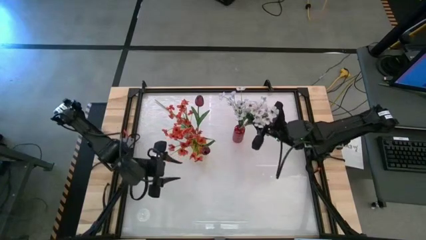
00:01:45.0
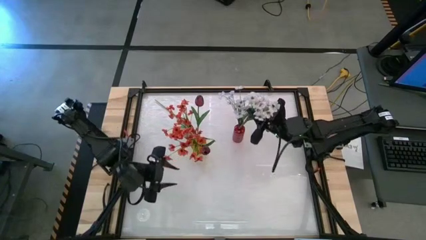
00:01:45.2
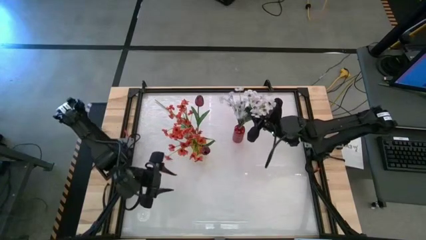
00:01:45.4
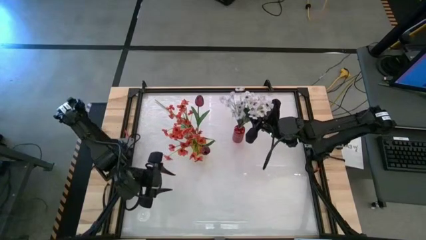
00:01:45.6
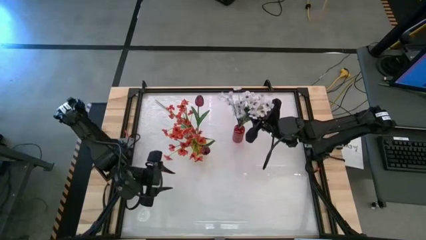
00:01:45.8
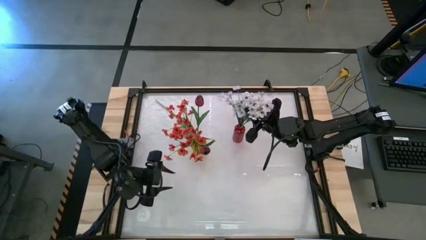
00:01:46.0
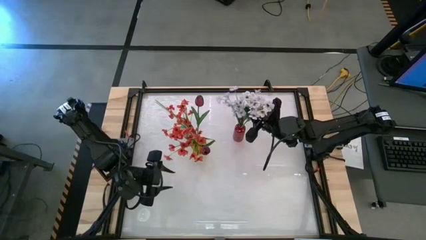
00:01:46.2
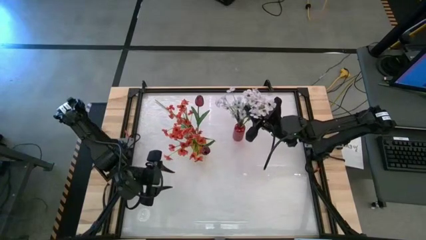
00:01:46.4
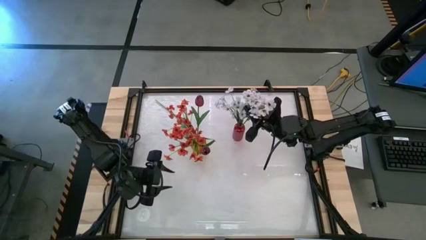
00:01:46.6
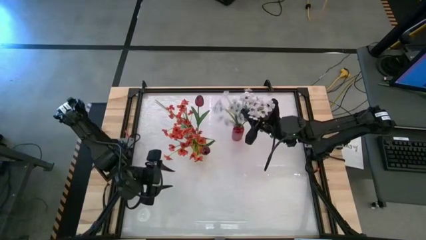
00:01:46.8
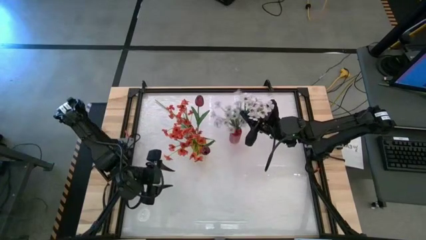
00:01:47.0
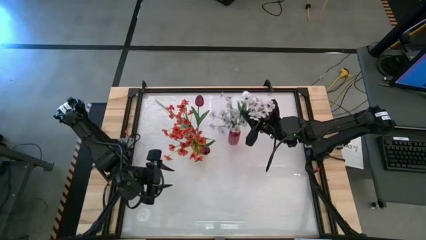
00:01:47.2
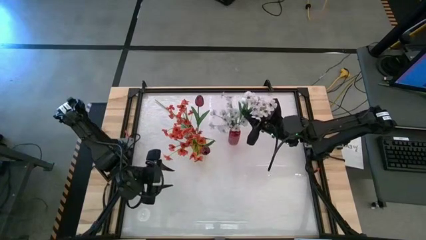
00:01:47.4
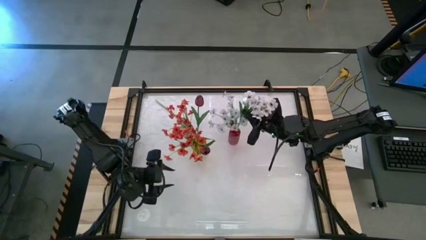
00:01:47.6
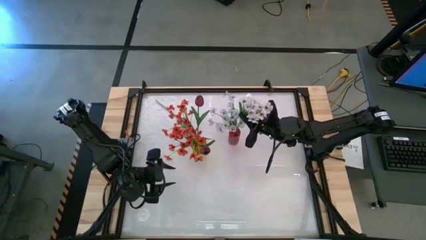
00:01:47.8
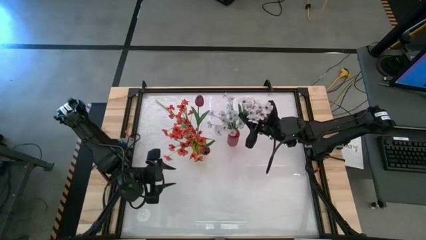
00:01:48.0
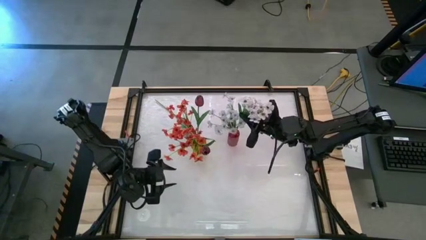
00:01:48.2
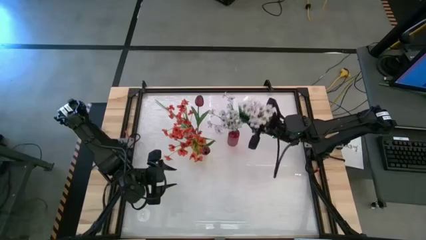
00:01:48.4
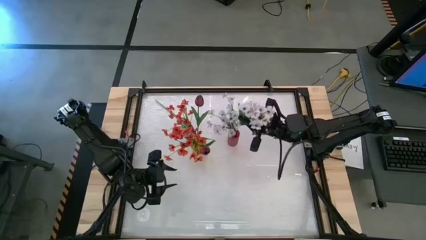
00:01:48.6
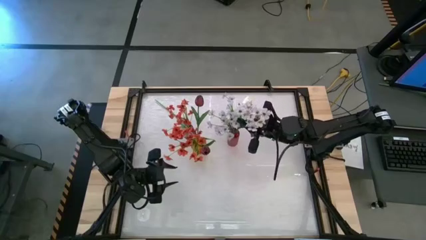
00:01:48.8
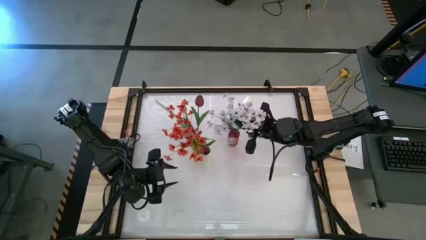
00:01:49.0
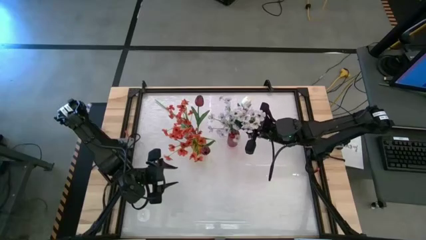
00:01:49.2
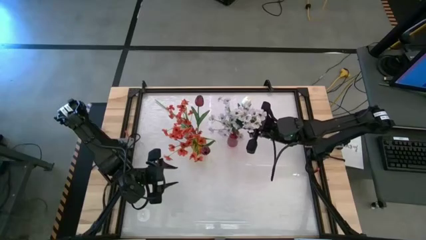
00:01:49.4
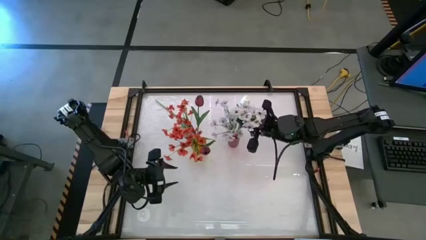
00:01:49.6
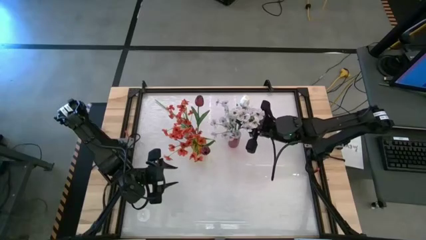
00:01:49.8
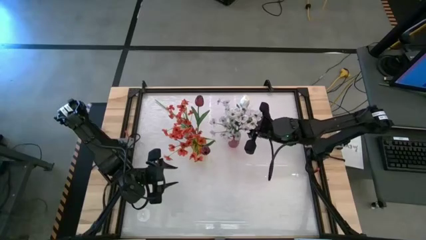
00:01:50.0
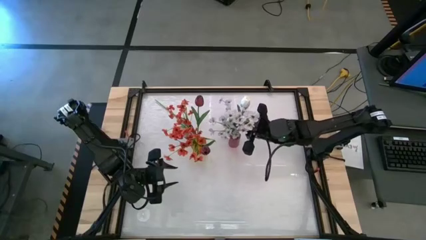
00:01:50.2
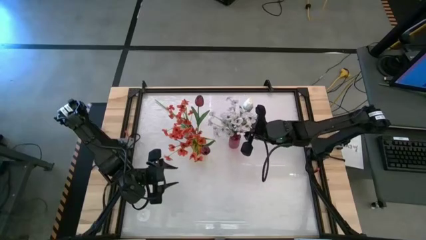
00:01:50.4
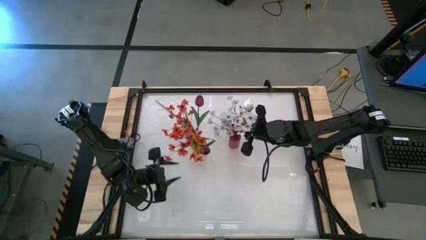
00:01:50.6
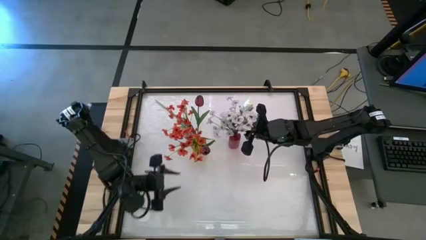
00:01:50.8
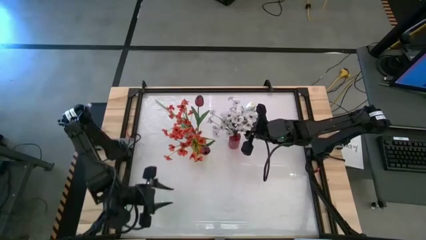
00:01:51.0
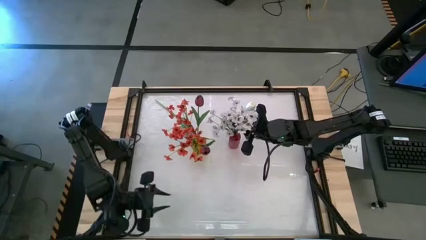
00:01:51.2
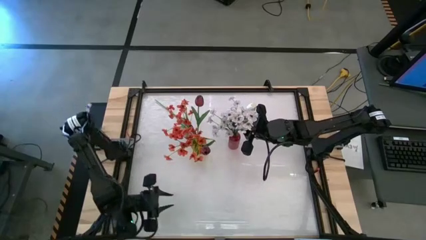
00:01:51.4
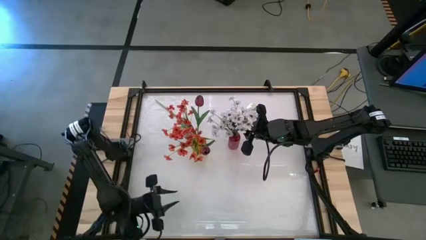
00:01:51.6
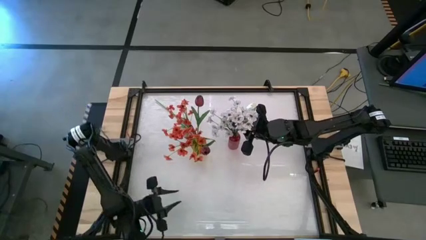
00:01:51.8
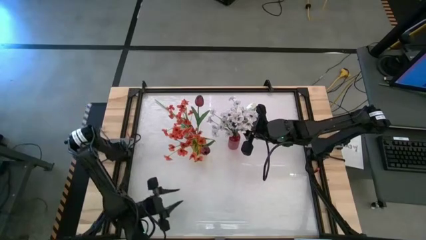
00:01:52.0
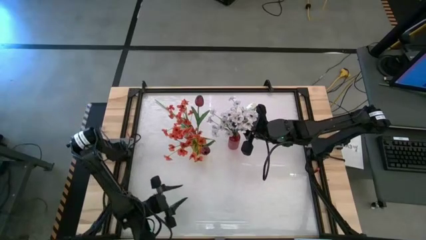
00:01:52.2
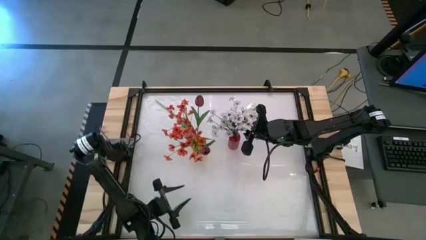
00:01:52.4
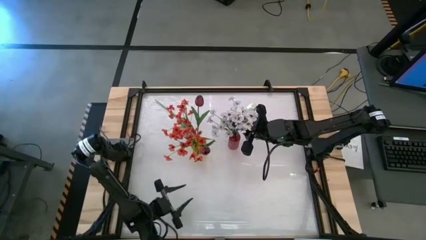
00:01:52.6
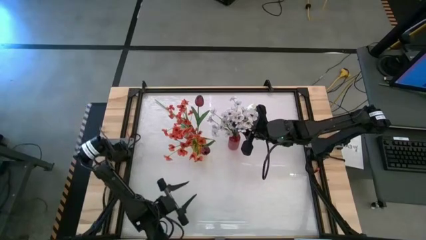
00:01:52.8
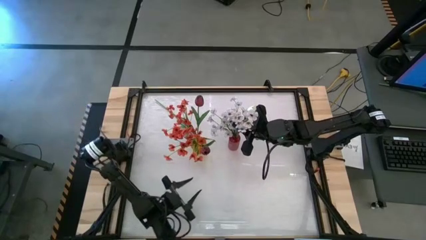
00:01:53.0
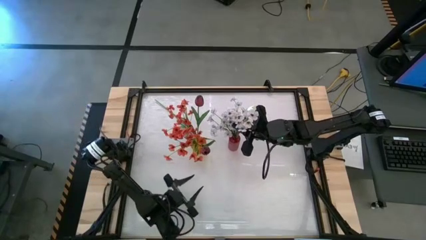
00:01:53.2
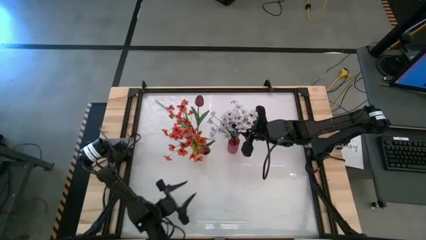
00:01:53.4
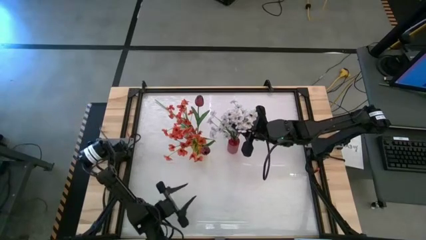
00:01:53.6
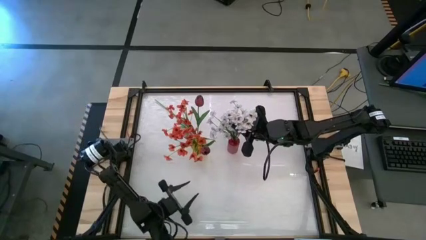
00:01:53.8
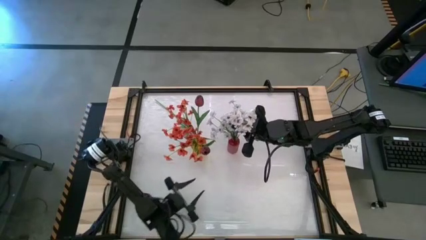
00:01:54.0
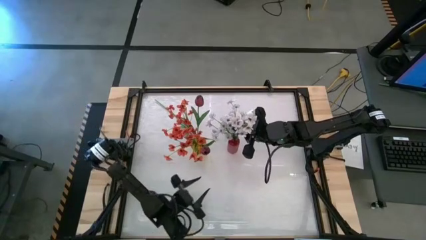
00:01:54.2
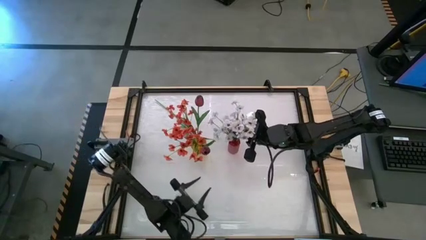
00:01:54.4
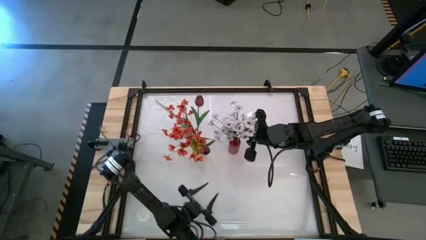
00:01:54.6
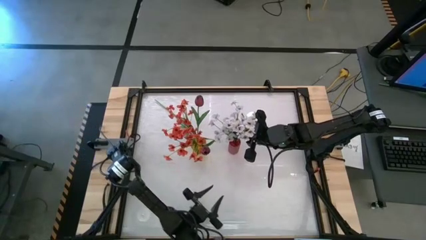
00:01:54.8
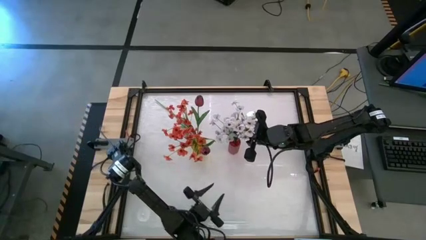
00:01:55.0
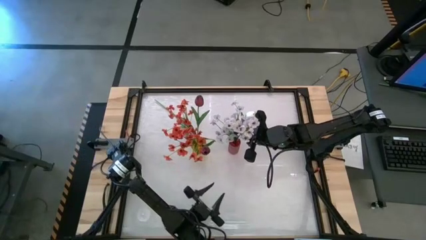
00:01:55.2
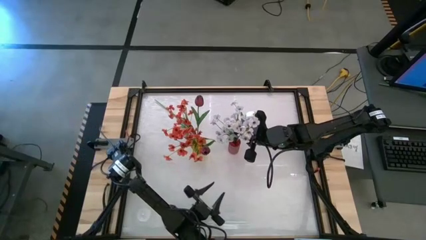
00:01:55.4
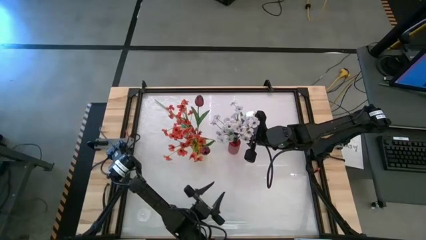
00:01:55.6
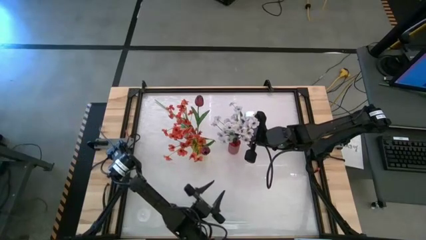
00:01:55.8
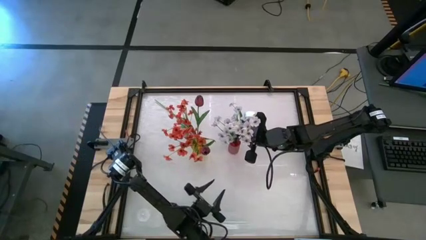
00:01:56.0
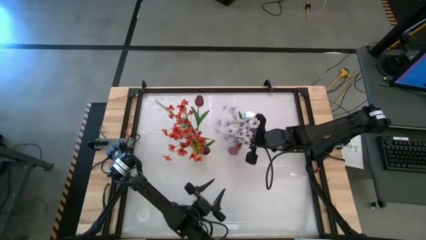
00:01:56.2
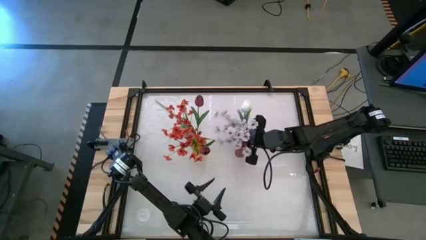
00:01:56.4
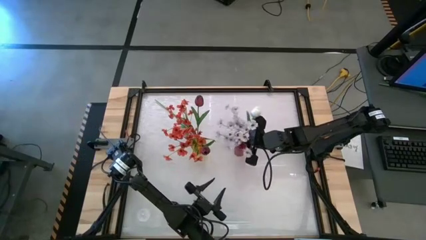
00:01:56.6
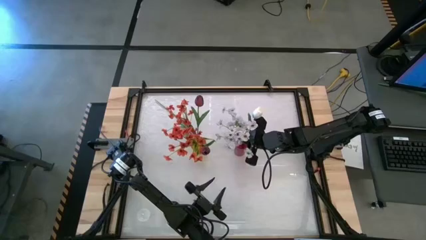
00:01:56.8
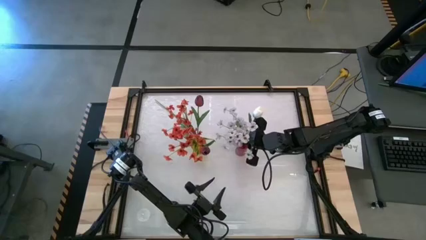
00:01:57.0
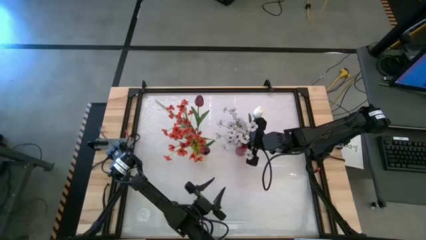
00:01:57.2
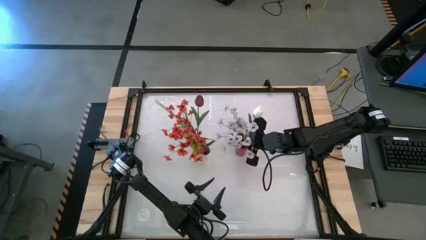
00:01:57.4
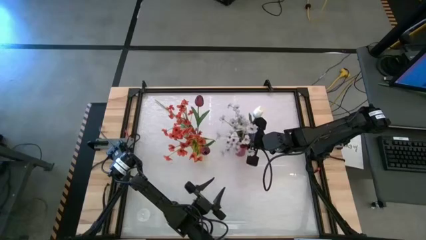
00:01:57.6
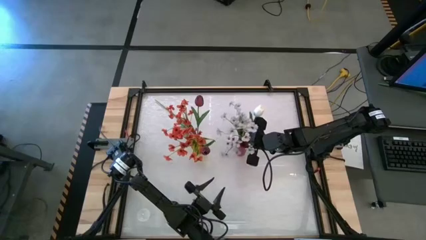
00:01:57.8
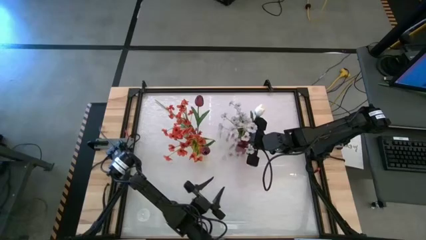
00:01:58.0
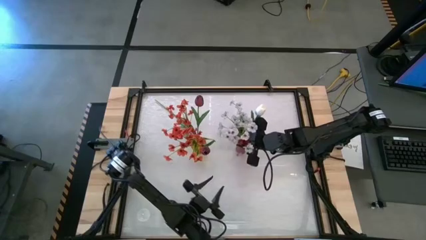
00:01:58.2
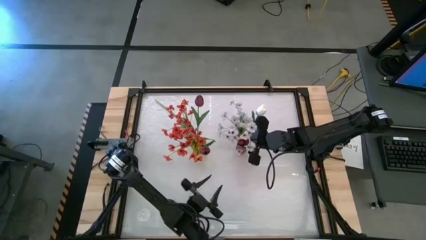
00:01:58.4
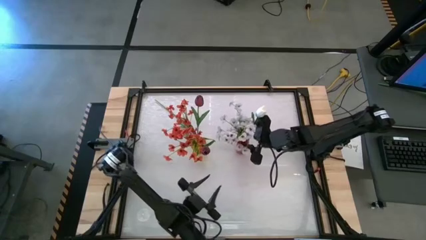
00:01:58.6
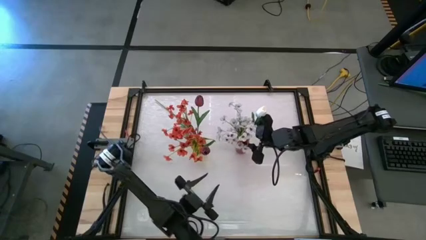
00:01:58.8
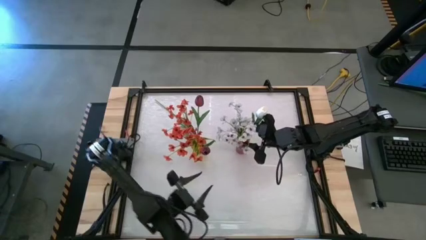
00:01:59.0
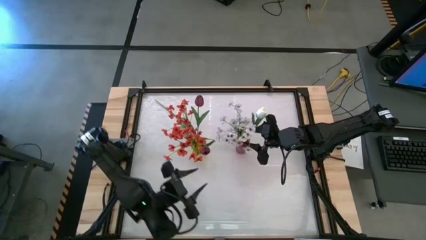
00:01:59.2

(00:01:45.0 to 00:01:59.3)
Task: Sort flowers into vase by color
Put the white flowers into the red flower vase

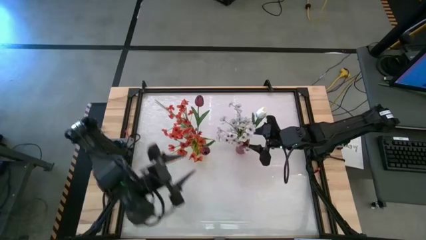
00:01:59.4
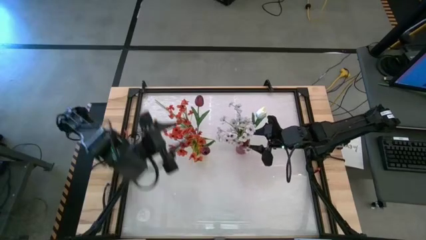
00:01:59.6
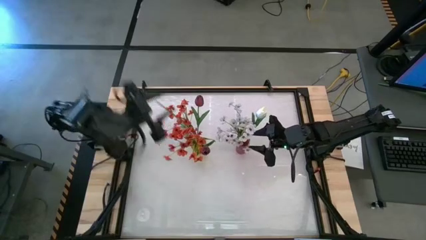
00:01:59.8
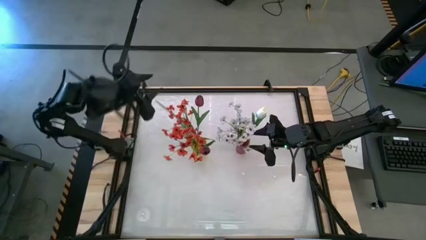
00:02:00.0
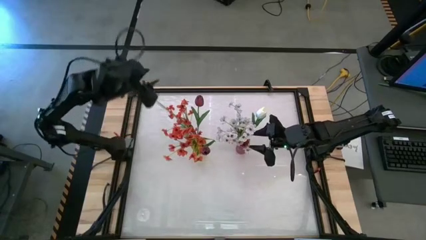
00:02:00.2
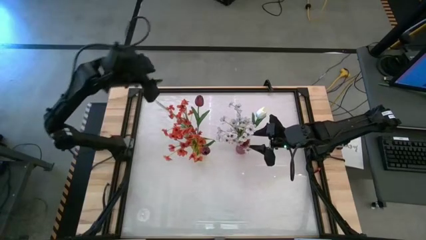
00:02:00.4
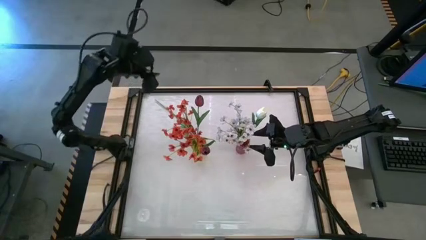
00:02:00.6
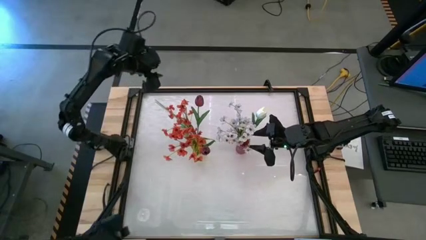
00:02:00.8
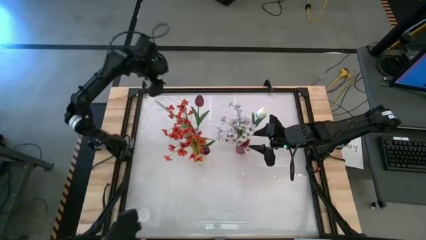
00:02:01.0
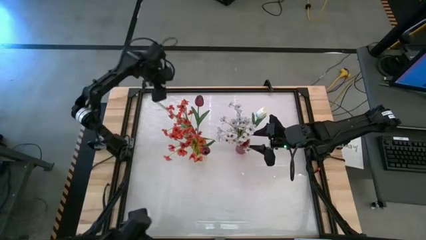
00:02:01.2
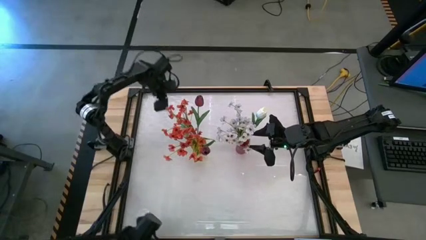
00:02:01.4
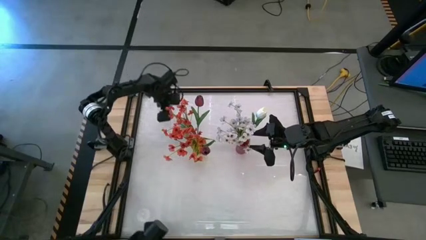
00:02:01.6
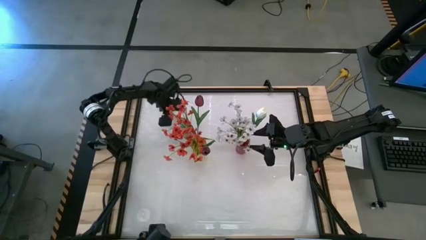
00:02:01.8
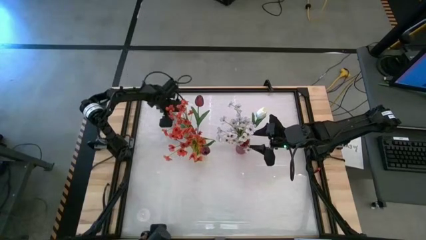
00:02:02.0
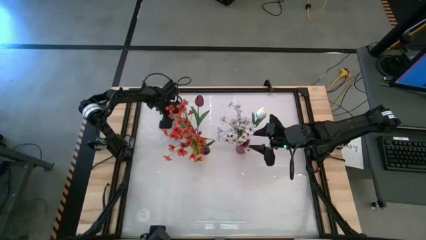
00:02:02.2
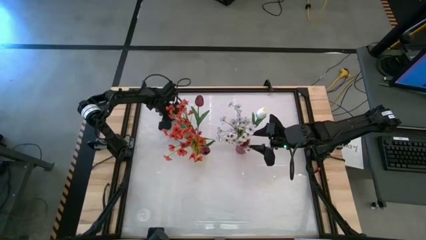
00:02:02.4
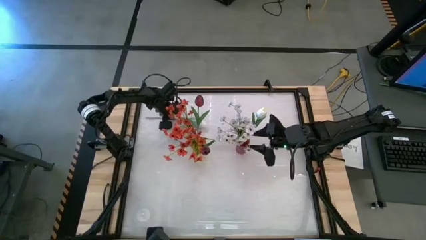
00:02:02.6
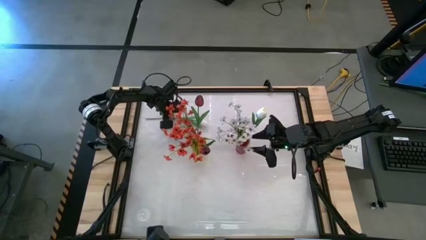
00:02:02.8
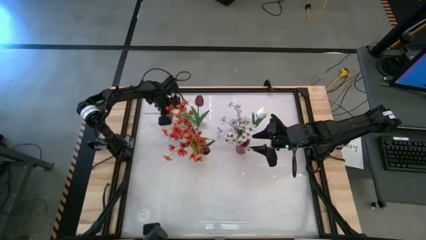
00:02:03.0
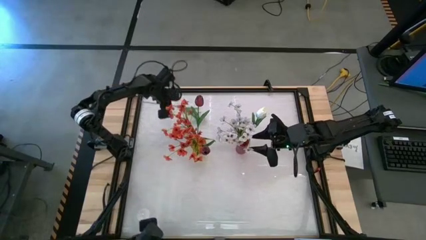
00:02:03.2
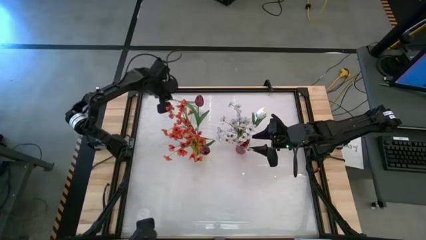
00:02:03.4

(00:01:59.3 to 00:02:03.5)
Put the white tulip into the red flower vase
